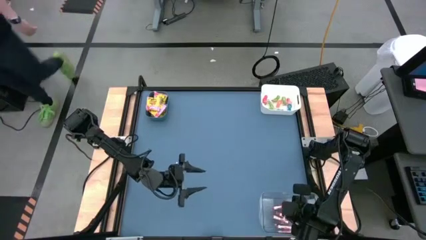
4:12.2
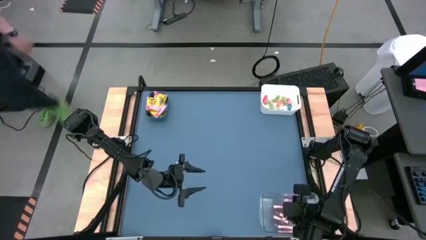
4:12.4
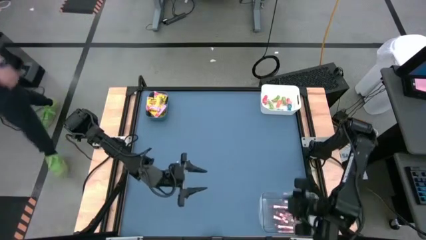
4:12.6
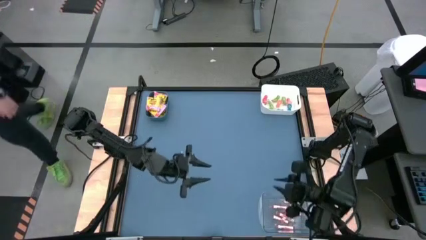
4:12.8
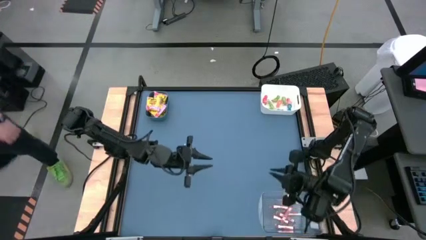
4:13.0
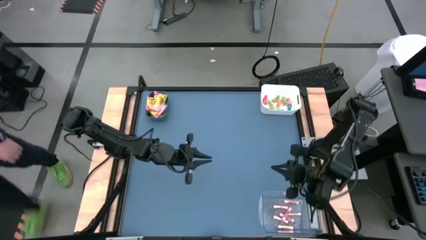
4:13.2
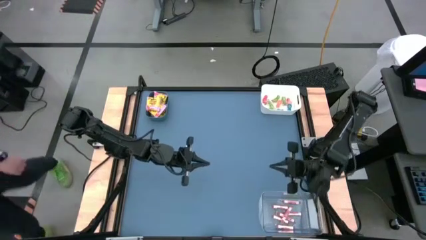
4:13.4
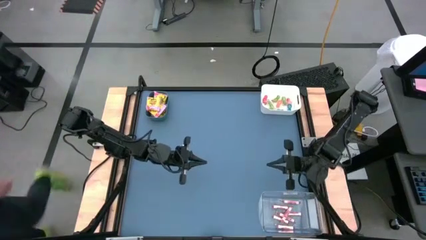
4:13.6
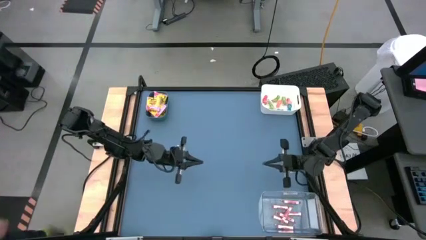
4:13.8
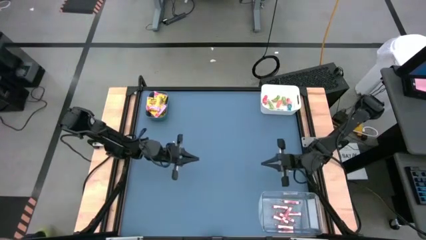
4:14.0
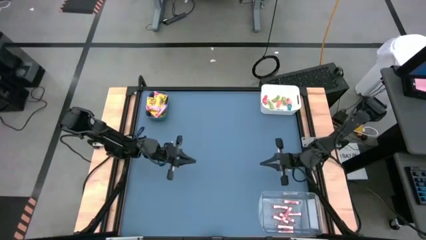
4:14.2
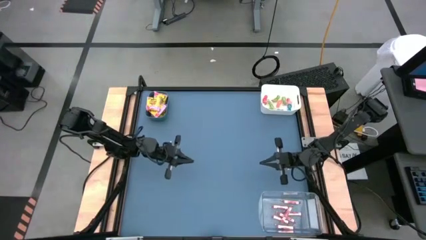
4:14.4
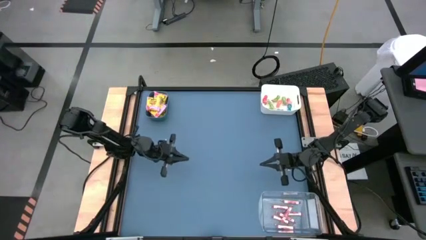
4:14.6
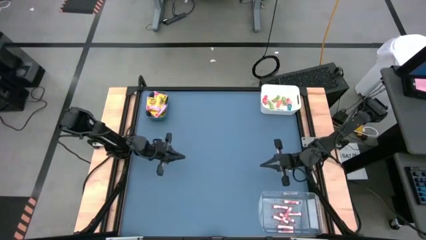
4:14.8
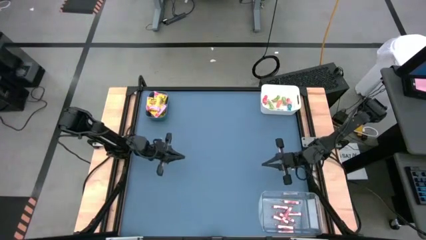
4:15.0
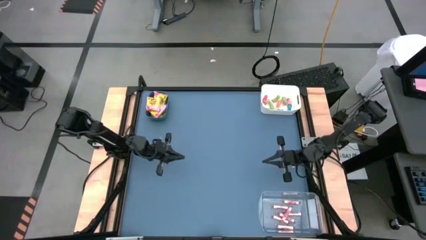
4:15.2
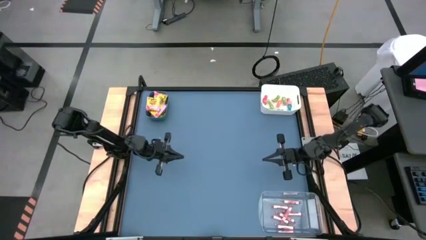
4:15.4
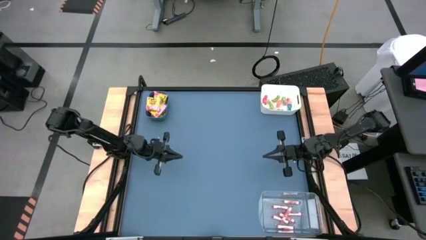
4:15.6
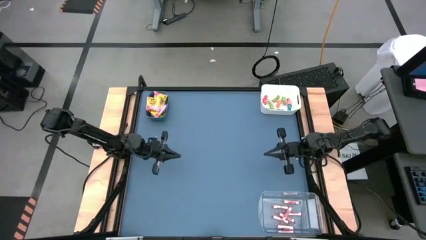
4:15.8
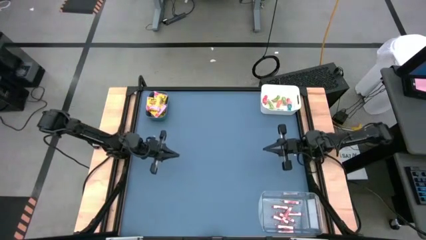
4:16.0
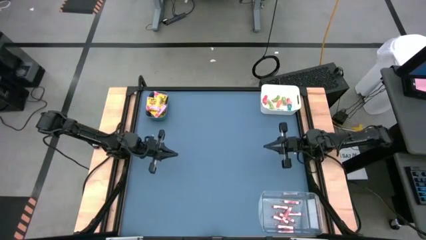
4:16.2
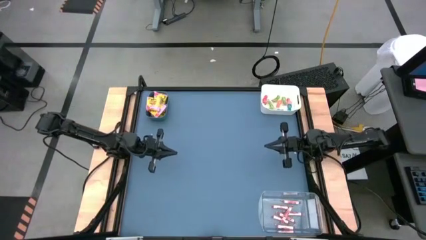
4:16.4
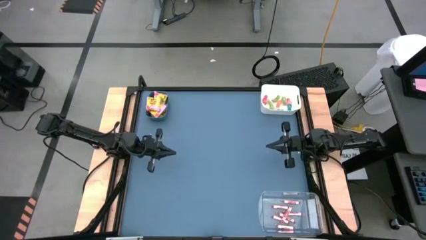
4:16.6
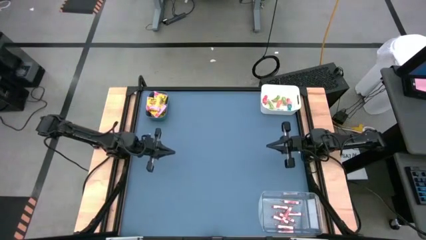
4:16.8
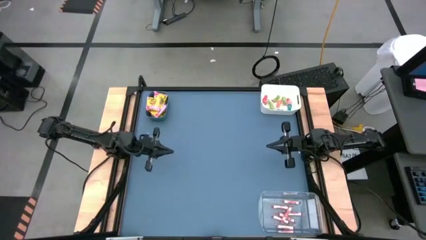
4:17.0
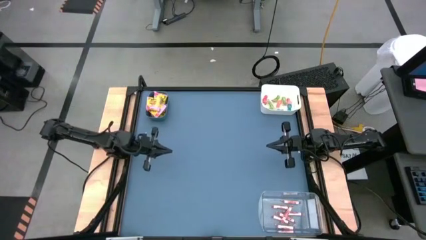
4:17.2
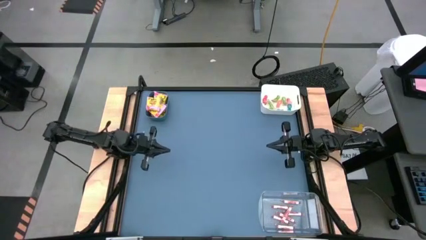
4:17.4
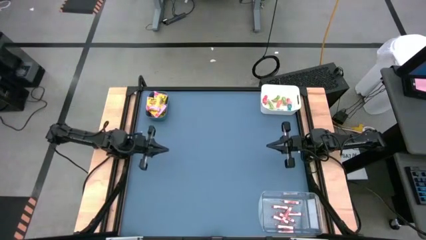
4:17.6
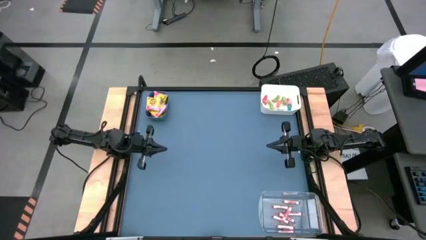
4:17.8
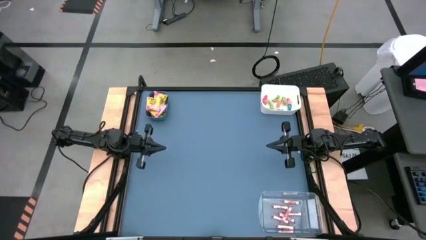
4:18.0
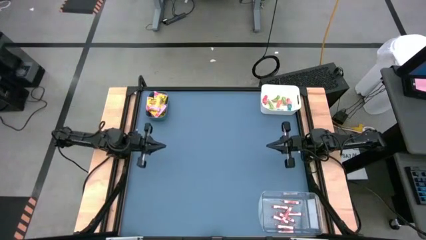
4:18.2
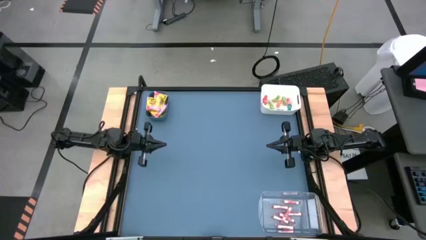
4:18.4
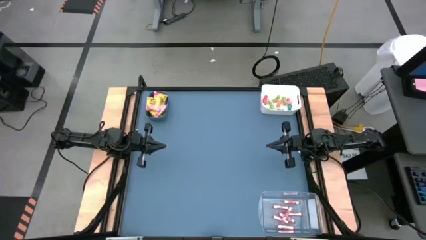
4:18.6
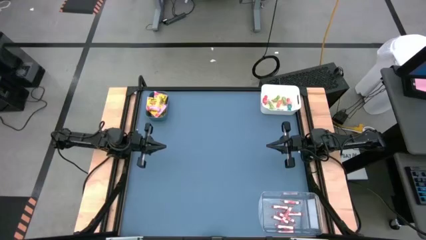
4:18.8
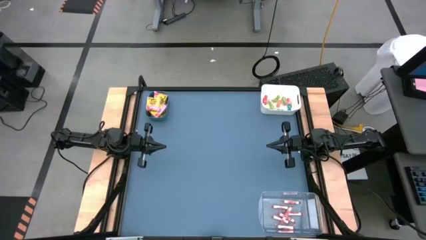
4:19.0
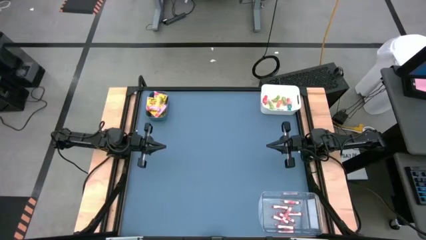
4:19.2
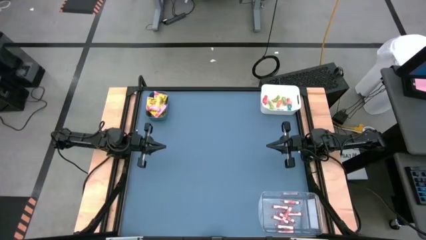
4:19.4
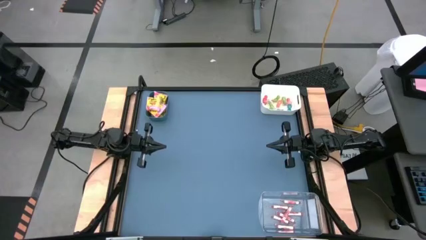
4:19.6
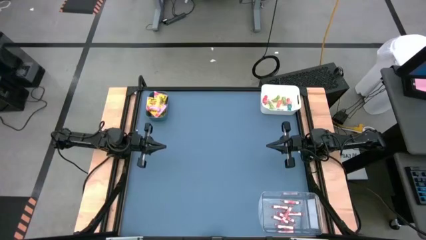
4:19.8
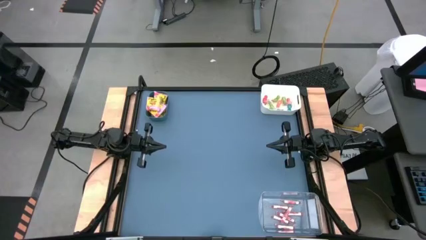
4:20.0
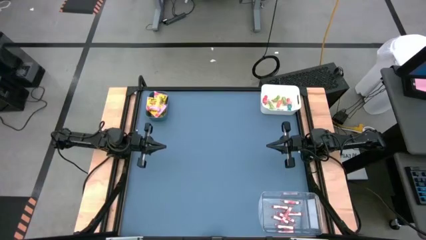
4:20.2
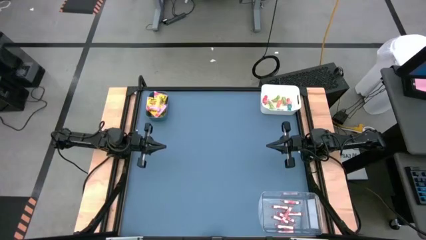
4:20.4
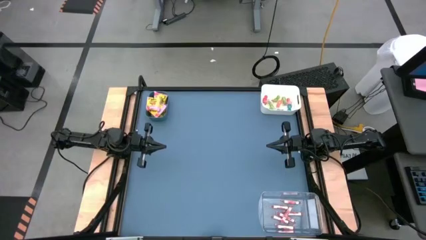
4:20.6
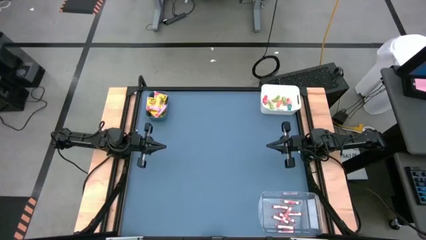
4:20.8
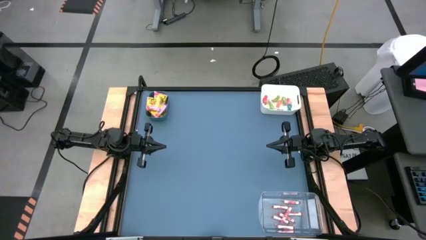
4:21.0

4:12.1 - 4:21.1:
Task: Sort candy
Return to Home Position

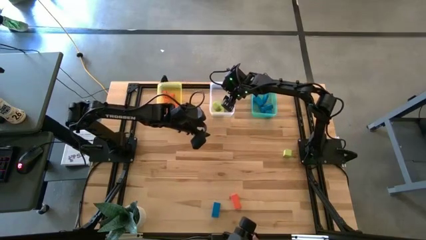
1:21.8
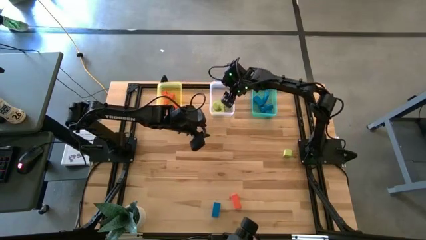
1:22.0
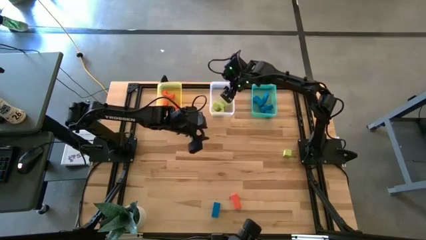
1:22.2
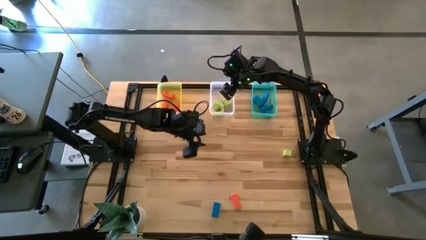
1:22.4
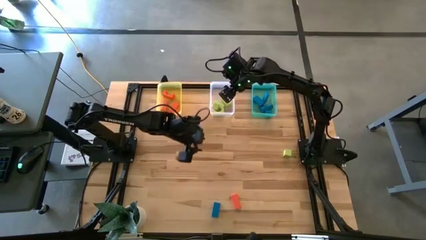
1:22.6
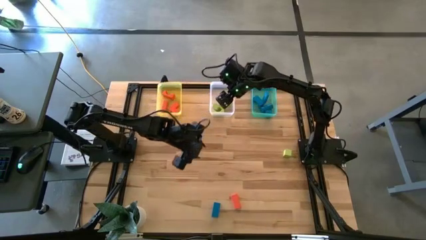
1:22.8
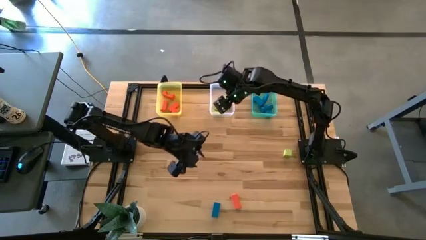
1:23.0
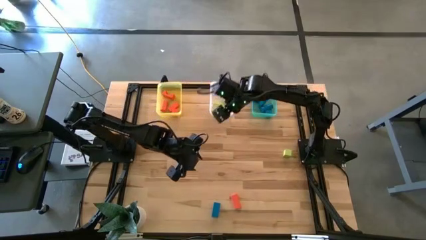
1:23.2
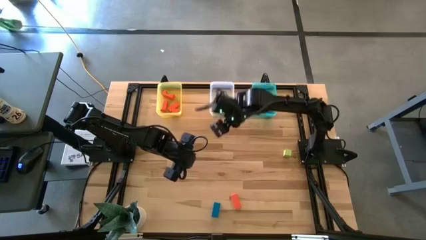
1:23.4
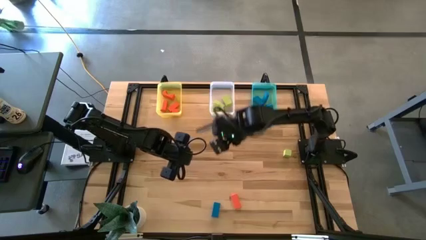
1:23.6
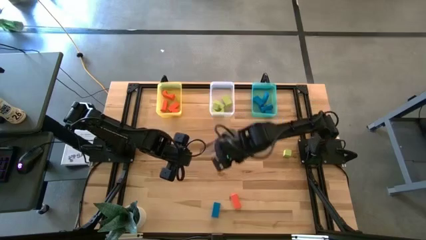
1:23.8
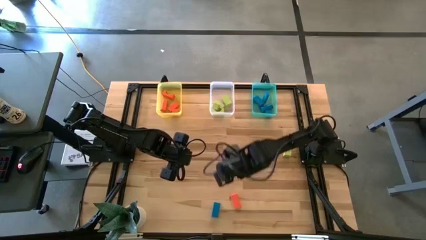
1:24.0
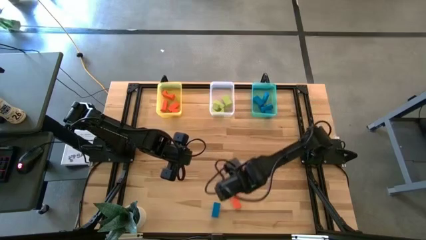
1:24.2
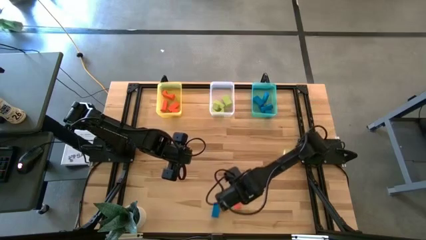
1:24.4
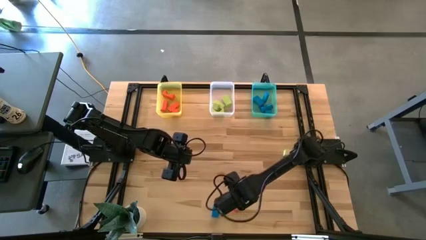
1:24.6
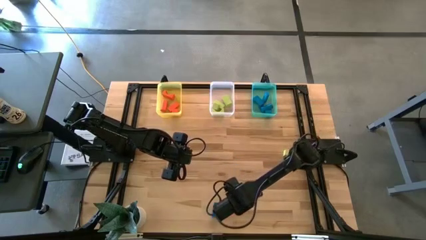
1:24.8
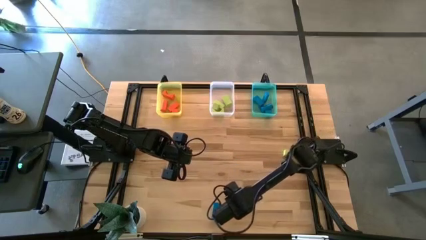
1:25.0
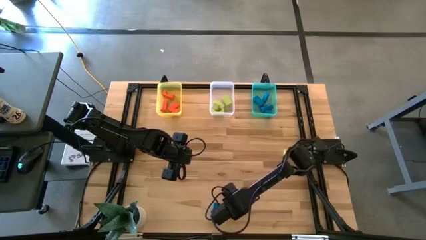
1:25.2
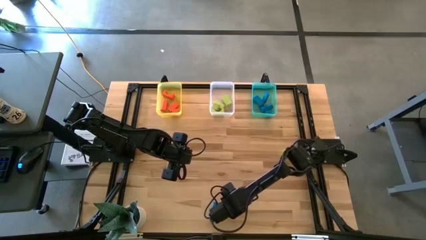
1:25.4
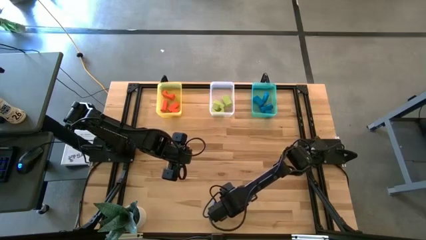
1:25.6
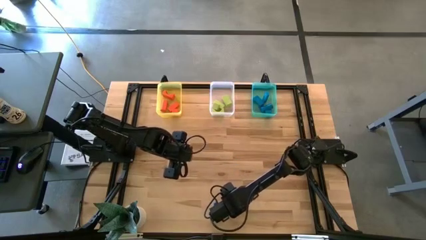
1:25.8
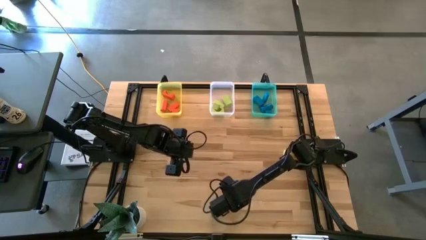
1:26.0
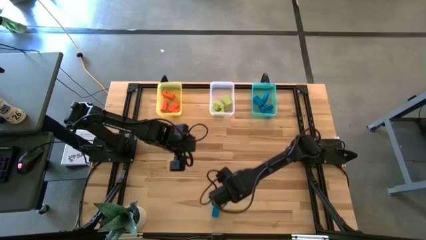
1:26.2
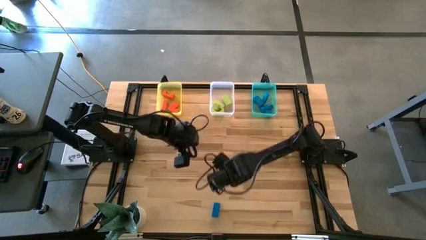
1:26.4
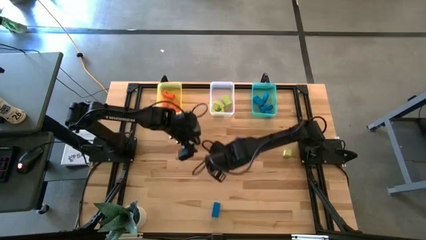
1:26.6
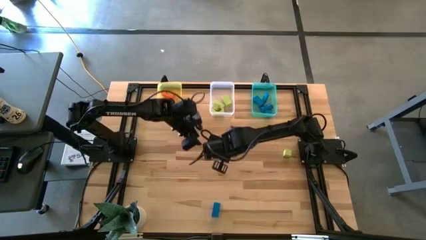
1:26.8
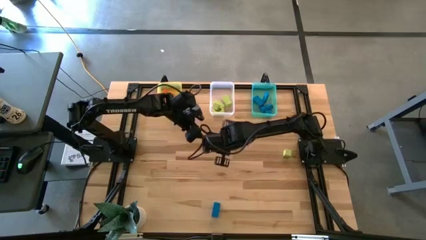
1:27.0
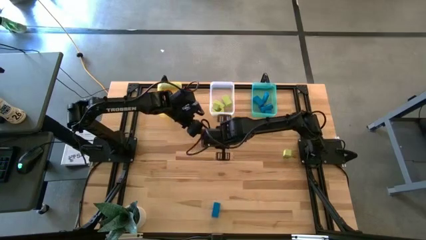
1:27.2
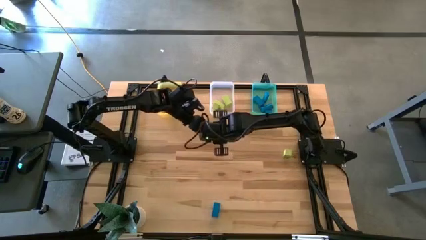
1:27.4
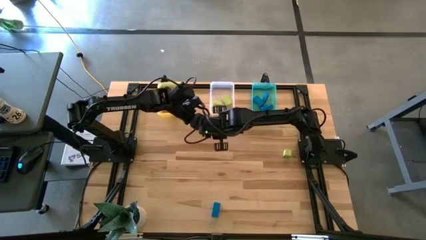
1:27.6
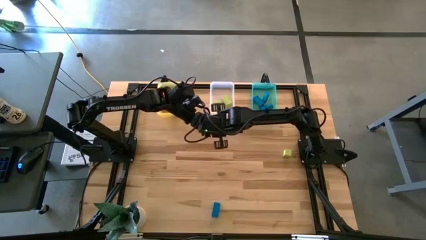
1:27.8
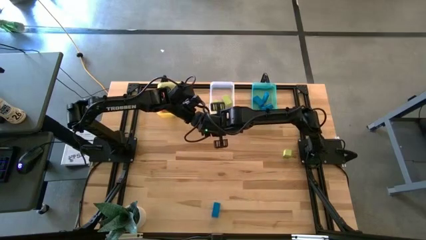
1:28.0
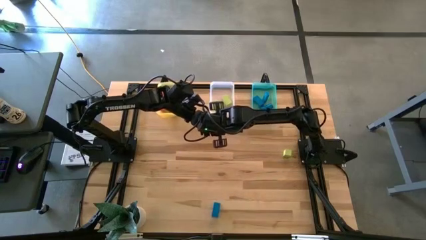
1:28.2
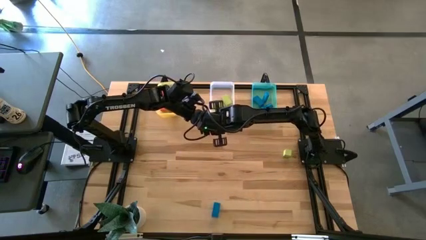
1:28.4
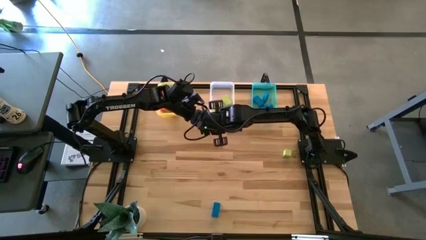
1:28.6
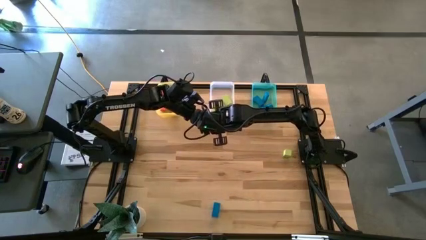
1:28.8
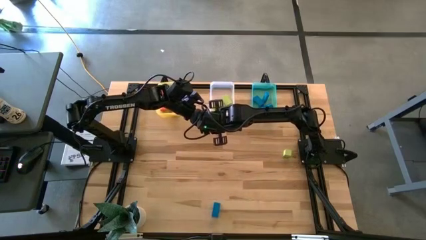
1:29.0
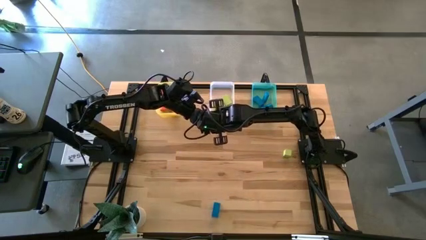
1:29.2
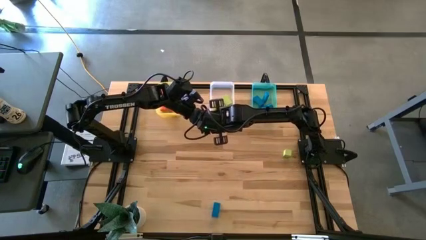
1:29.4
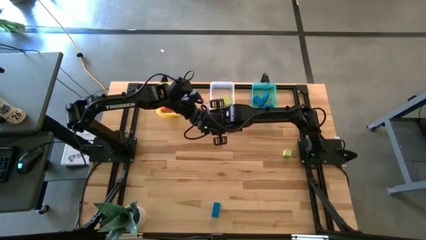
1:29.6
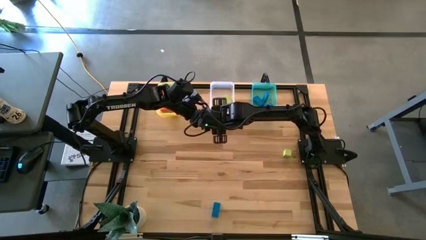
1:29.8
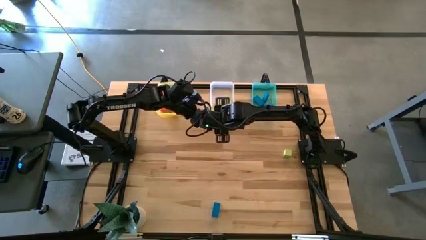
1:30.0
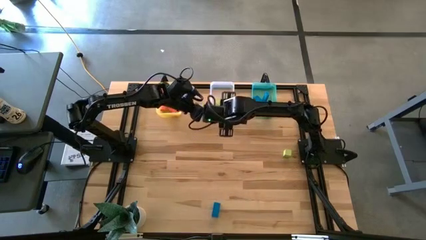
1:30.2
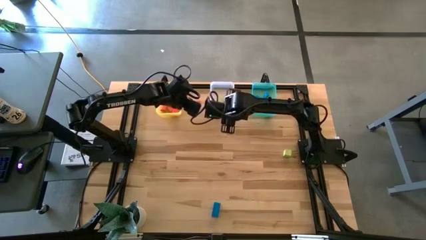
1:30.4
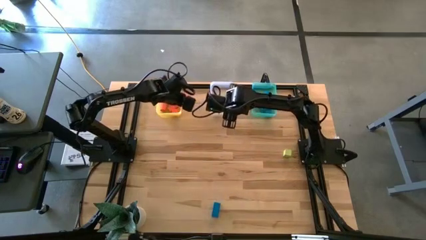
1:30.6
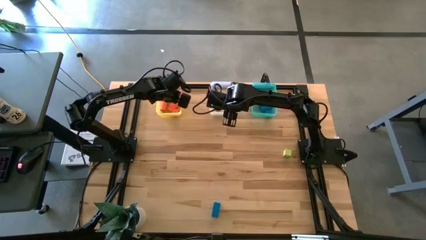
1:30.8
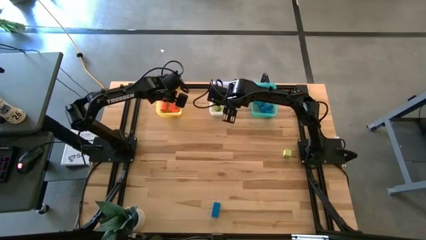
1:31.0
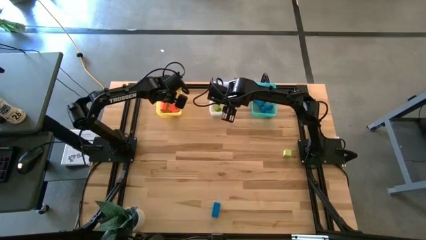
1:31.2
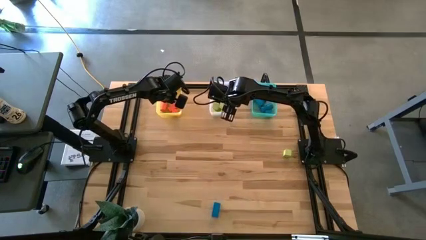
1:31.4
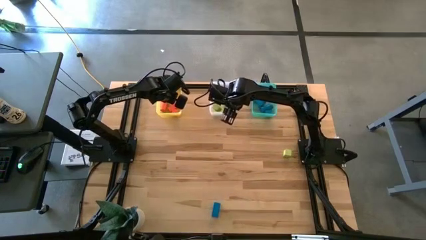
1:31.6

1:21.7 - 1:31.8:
Task: Sort & place blocks by color
Put the orange block into the yellow bin
